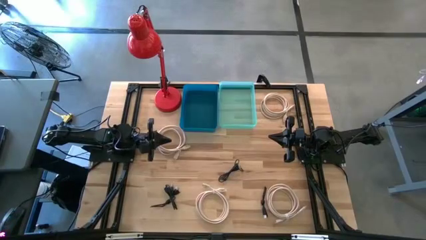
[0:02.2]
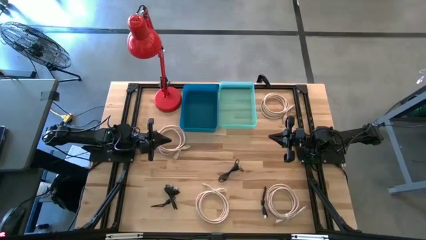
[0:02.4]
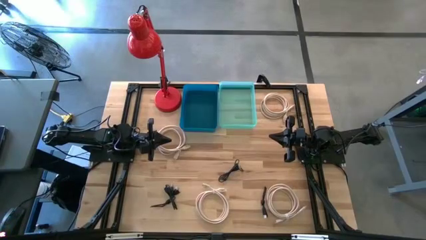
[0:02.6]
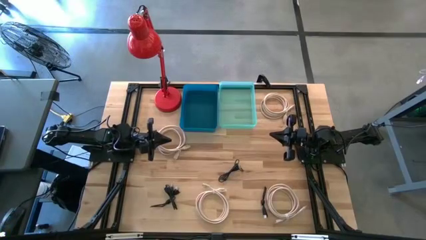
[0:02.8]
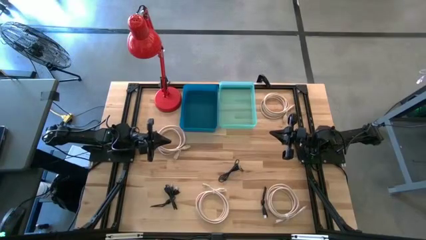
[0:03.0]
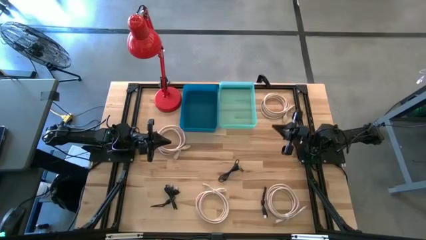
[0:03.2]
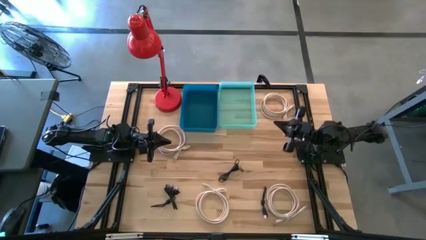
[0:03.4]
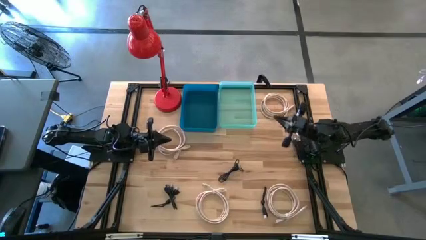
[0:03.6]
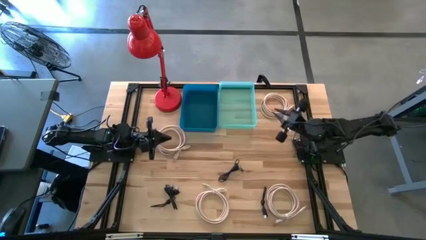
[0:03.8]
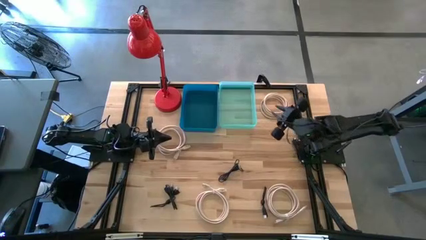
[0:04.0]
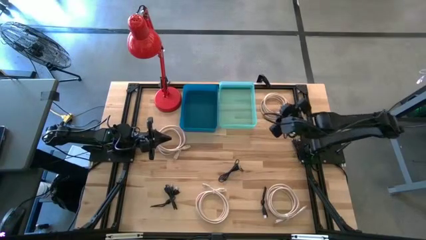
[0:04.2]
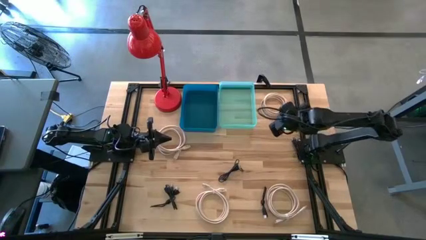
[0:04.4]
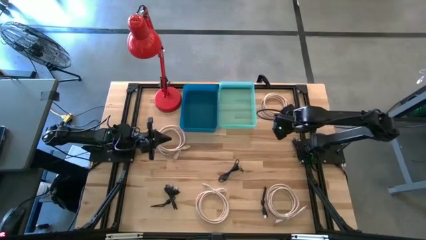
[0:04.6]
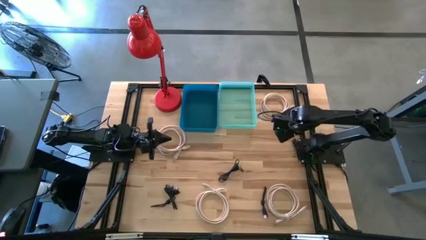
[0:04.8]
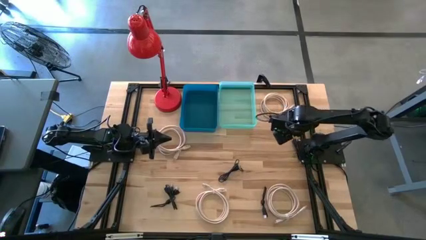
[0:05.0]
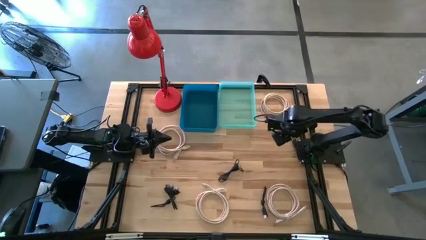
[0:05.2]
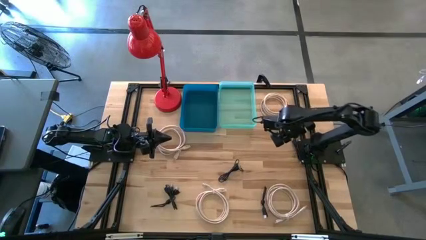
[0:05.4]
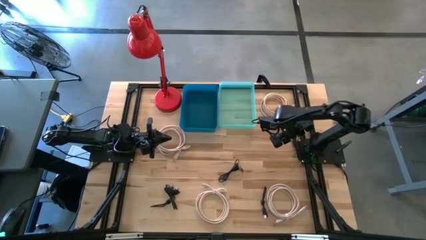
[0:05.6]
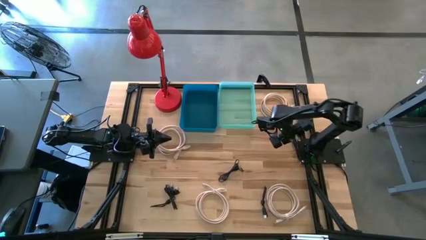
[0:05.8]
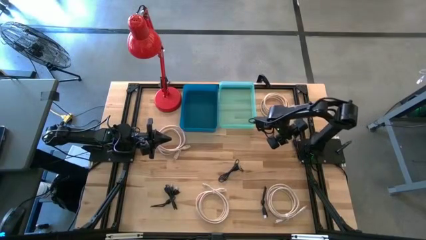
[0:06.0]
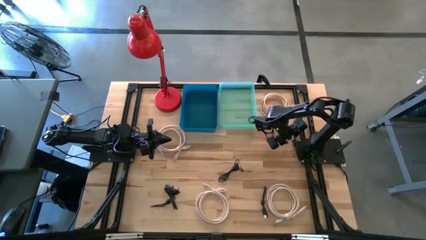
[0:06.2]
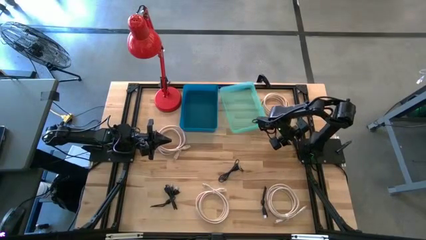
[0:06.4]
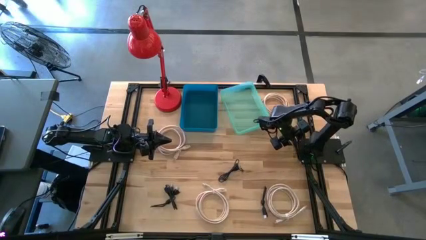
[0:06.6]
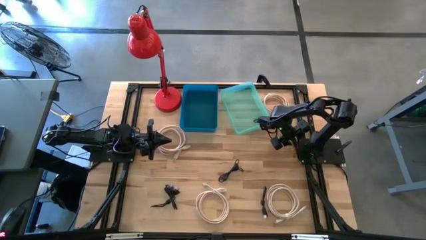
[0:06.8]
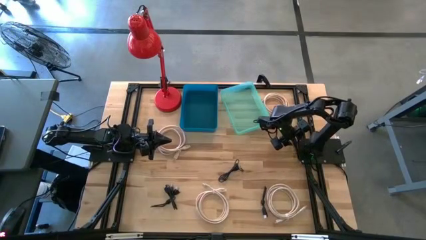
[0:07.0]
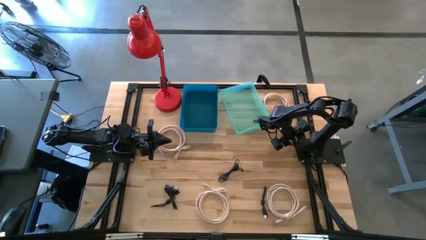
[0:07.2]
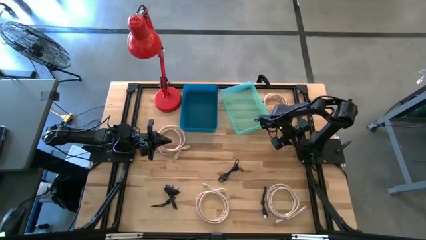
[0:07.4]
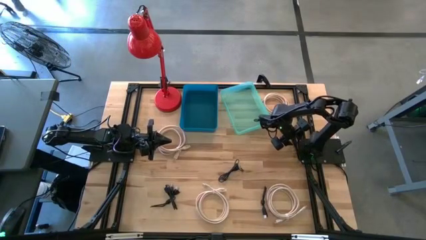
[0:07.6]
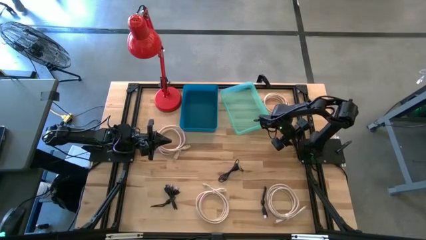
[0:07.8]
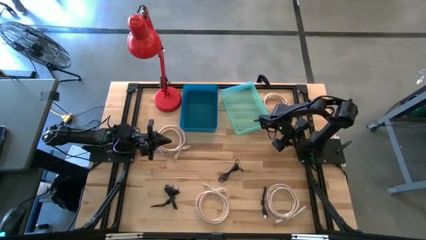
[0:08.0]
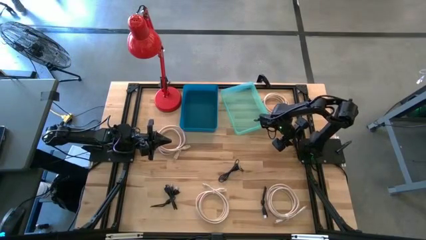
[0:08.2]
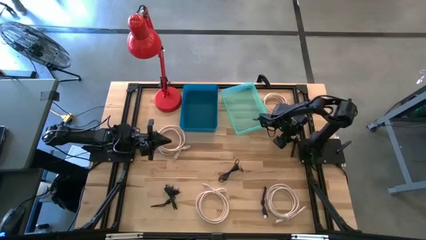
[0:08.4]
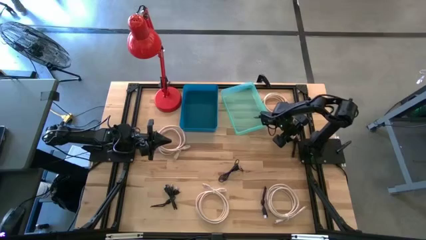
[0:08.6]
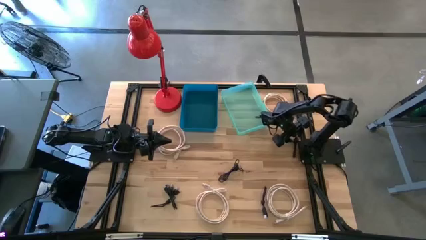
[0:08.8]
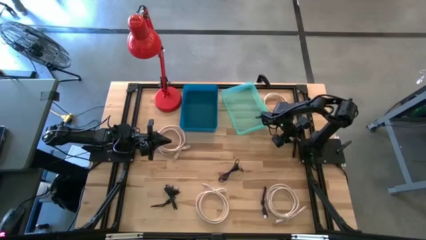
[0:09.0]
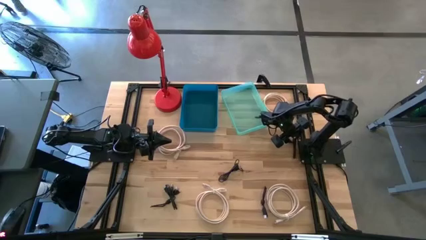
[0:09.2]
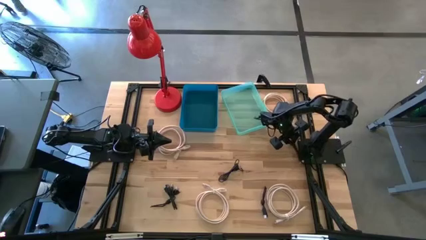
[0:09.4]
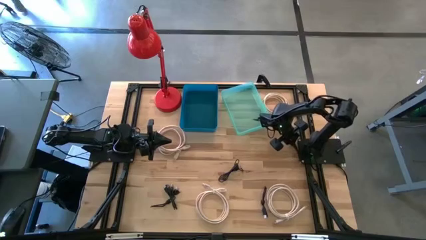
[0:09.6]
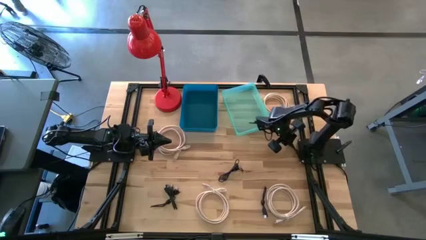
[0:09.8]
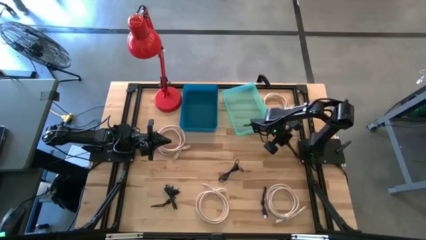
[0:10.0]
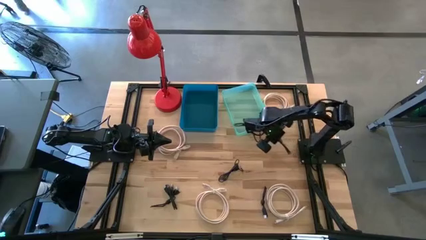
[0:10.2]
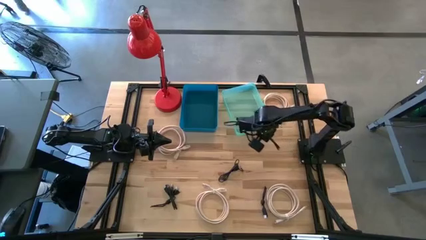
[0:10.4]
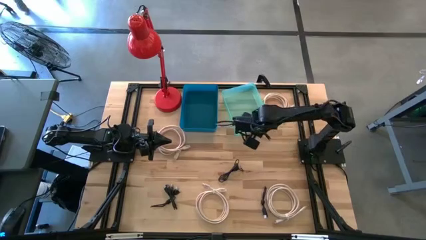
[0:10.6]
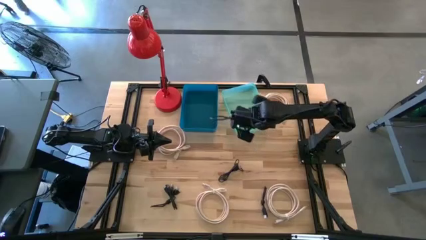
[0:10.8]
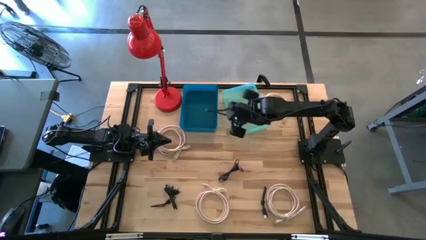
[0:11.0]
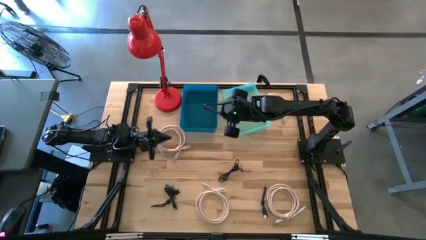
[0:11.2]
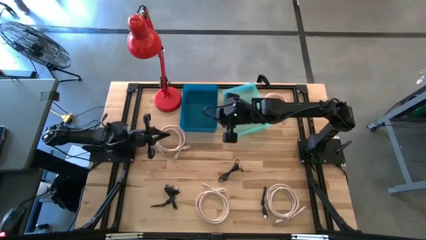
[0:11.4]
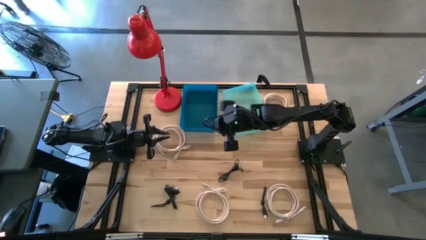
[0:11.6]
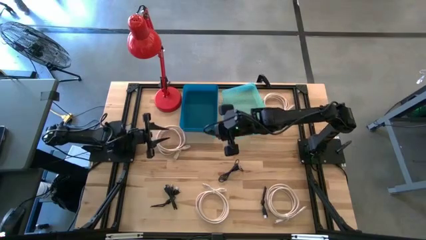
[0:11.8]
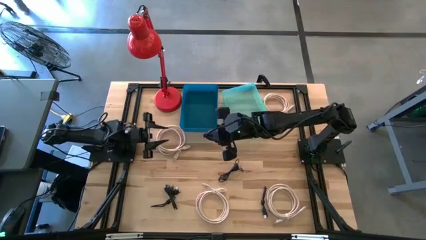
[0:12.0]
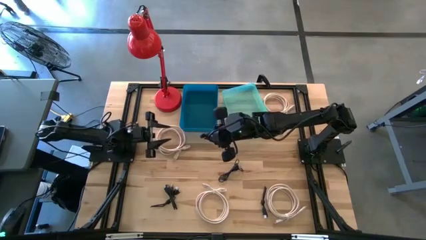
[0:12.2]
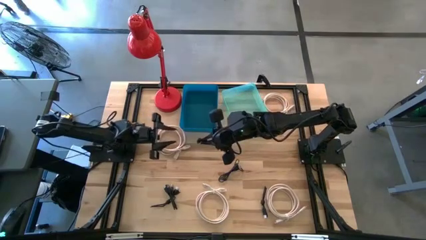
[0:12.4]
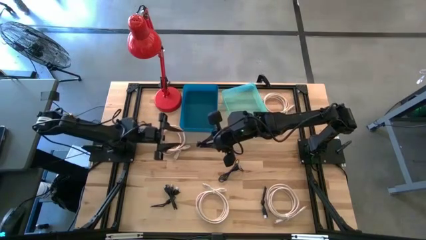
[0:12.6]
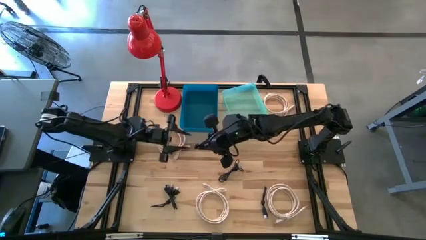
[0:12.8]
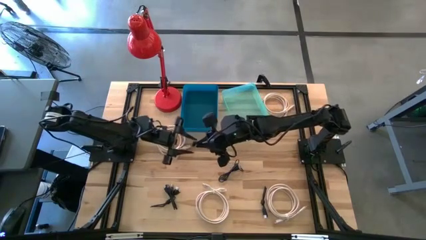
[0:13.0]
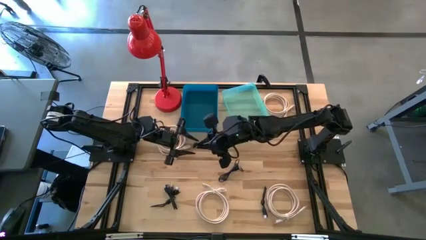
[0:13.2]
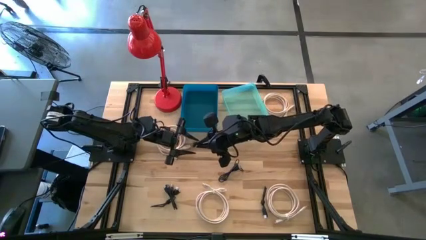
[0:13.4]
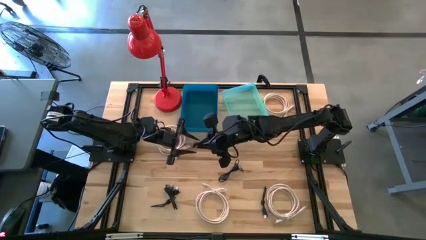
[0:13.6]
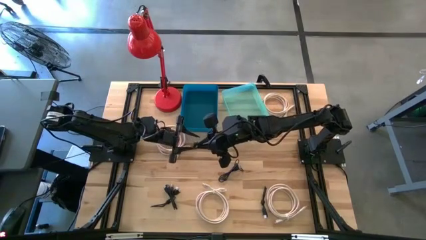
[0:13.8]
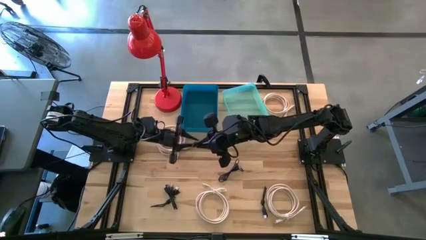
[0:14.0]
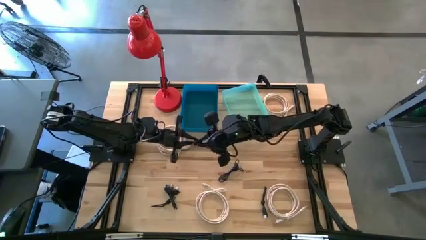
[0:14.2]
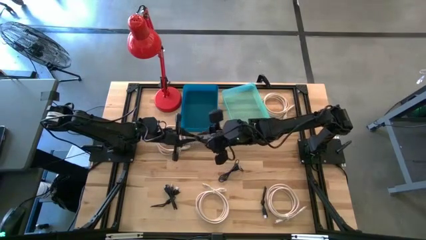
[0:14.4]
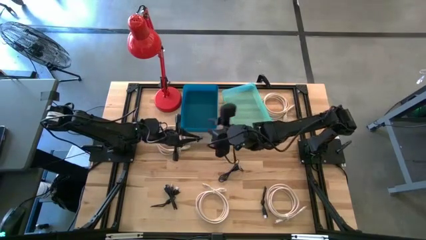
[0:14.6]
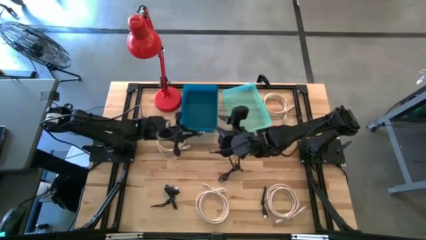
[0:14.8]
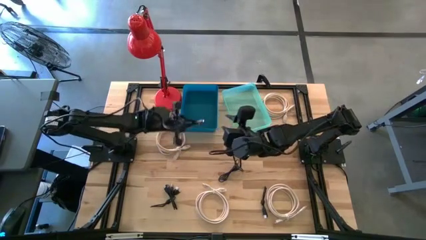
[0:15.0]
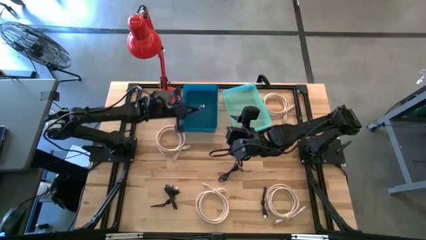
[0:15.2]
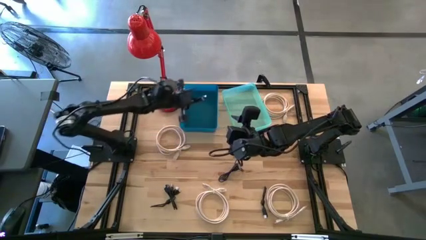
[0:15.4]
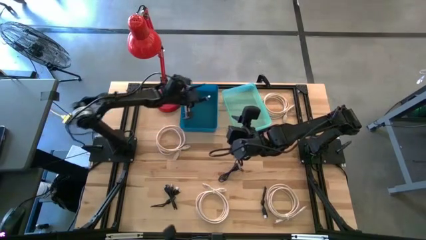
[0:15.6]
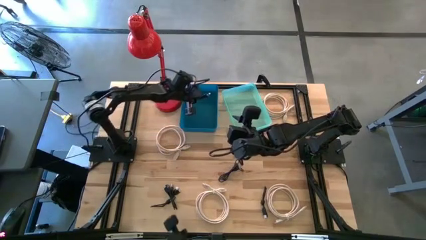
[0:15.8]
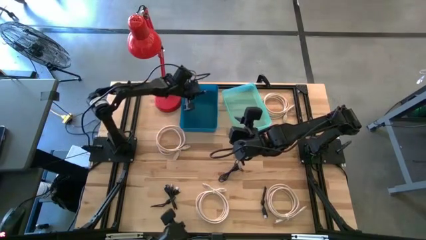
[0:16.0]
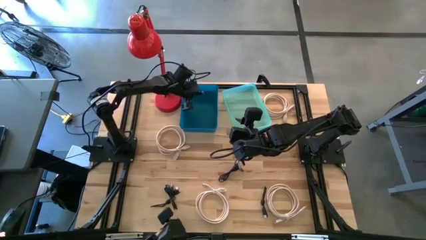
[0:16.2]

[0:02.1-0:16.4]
Task: Pick & Place USB Port
Put the black USB cable into the blue bin

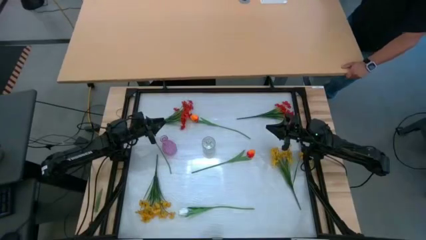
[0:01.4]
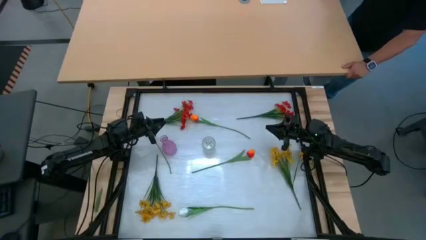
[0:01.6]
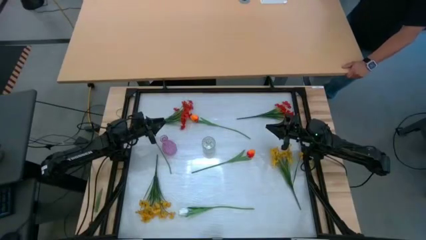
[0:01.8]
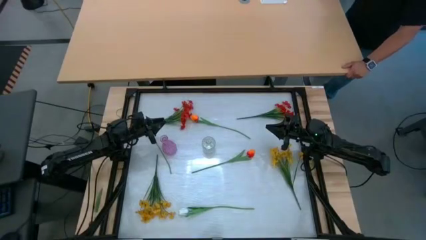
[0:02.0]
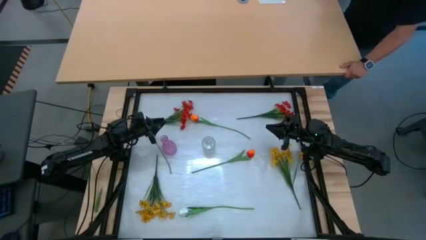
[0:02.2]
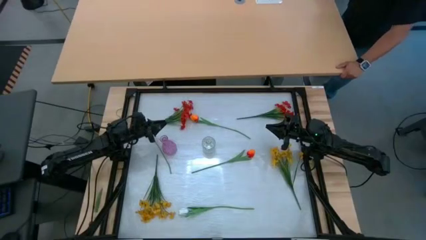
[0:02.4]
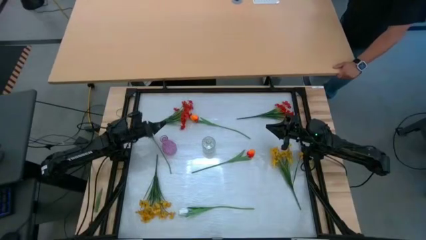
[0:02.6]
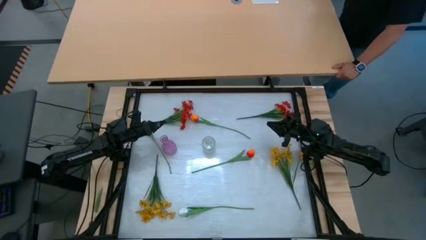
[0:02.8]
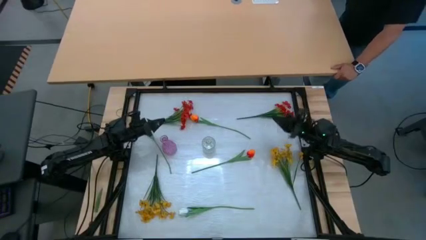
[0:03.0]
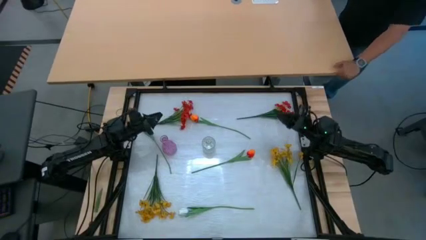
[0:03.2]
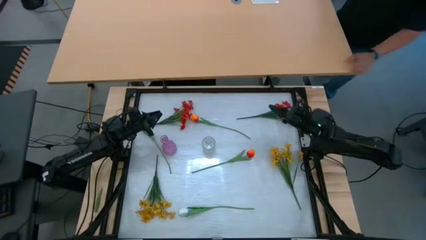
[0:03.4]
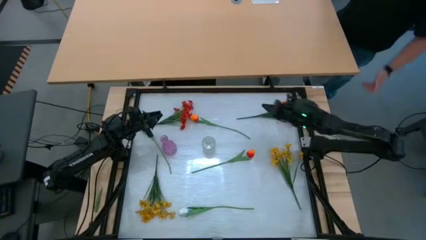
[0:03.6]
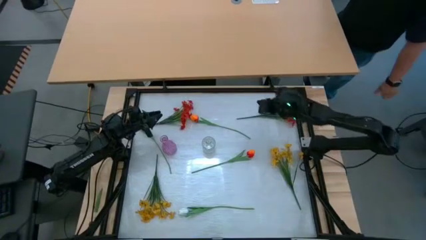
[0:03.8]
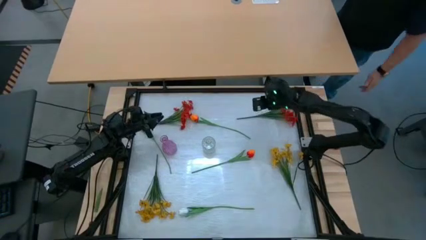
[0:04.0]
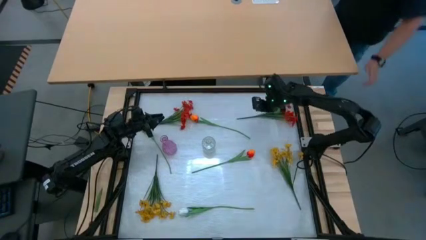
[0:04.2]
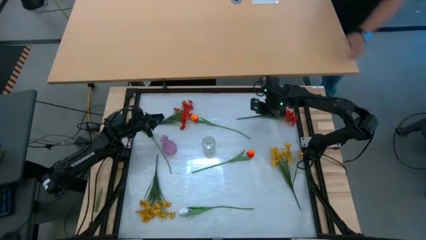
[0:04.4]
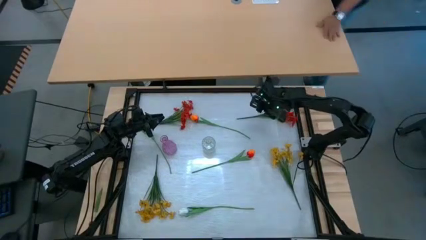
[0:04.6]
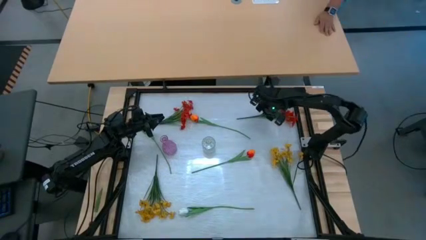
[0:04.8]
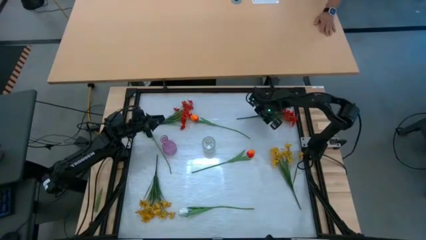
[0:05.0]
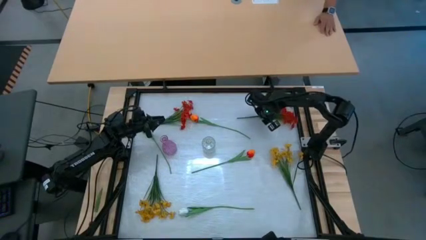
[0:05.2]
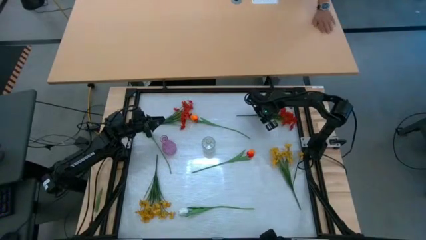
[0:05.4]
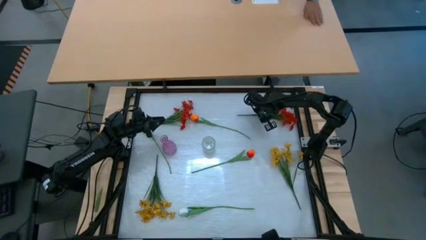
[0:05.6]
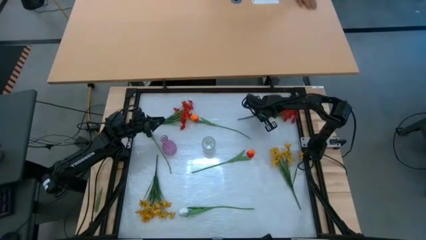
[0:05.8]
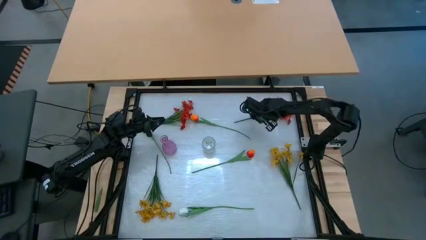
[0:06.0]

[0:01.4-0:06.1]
Task: Sort flowers into vase by color
Put the right red flowers into the violet vase
